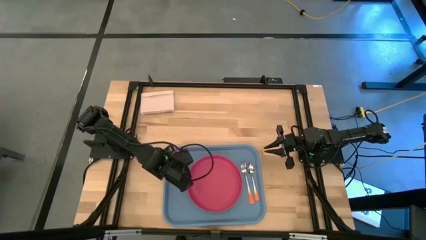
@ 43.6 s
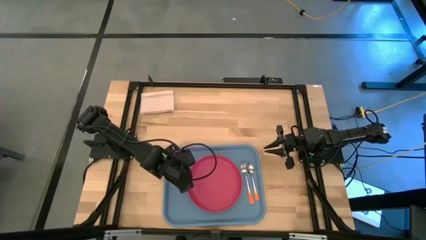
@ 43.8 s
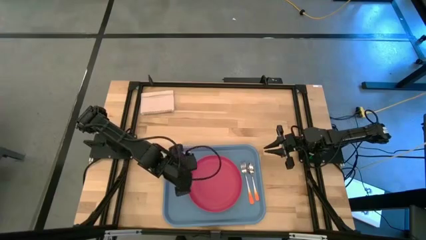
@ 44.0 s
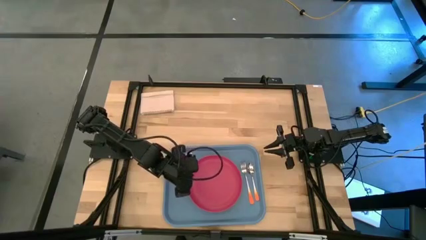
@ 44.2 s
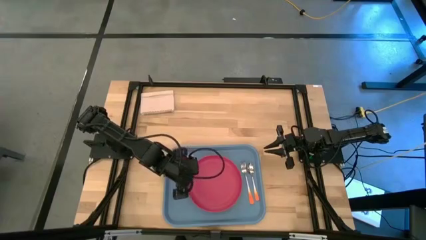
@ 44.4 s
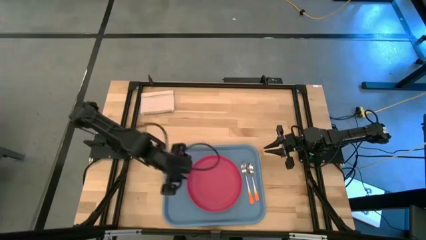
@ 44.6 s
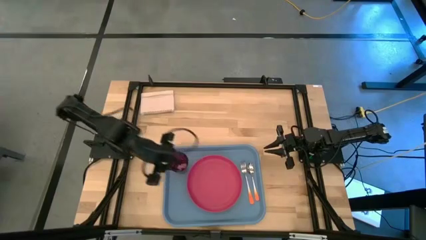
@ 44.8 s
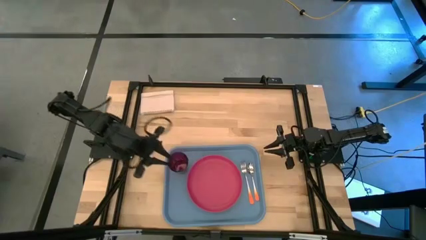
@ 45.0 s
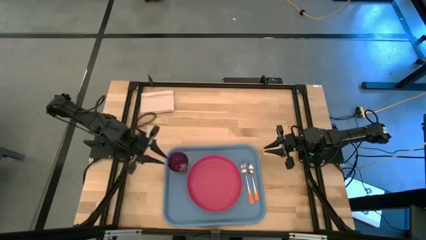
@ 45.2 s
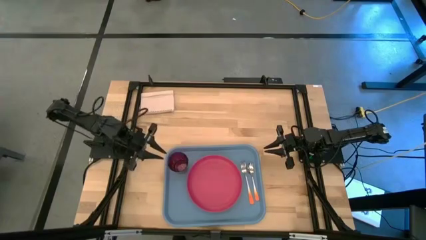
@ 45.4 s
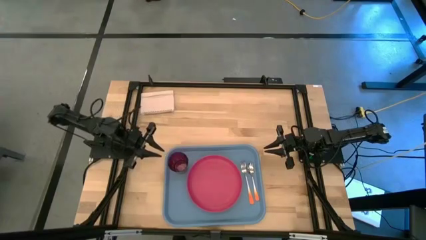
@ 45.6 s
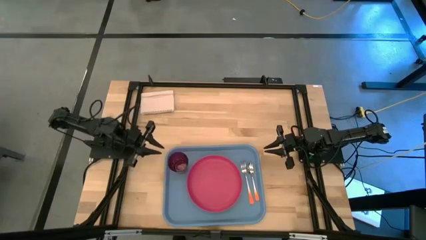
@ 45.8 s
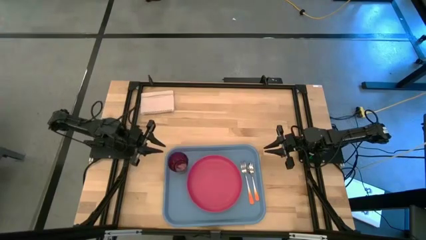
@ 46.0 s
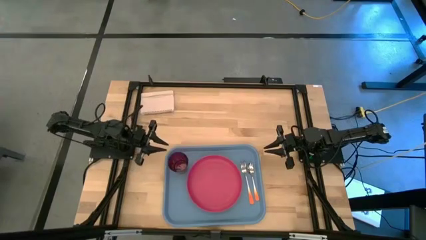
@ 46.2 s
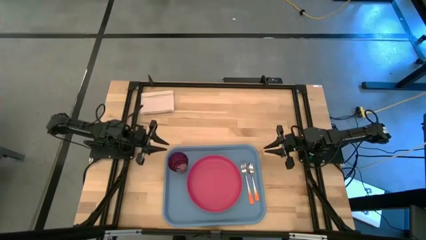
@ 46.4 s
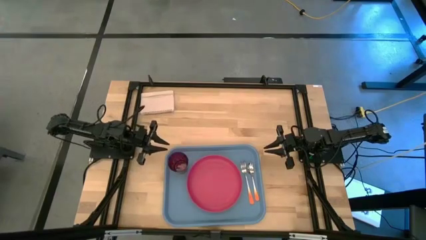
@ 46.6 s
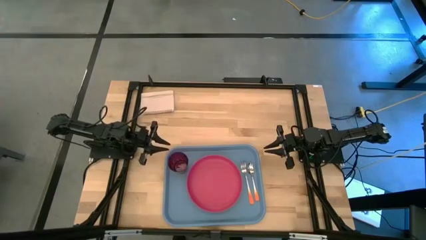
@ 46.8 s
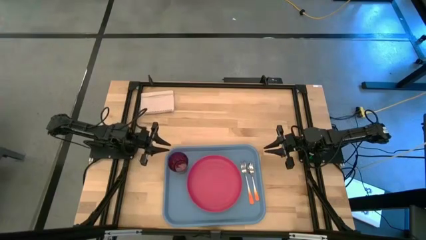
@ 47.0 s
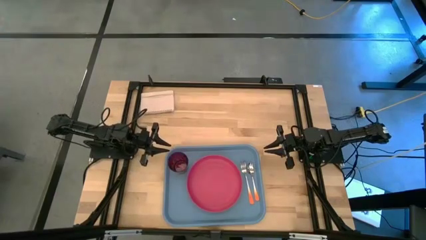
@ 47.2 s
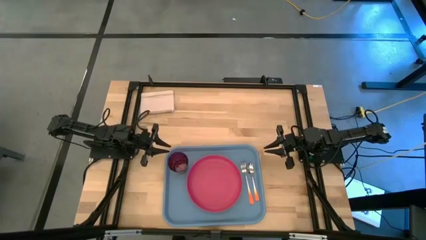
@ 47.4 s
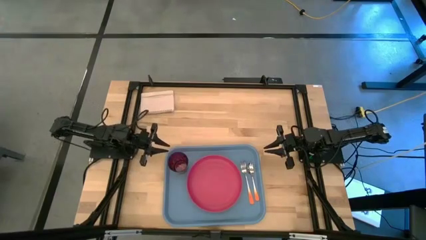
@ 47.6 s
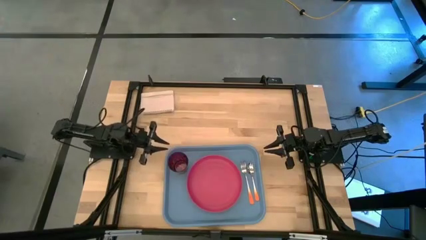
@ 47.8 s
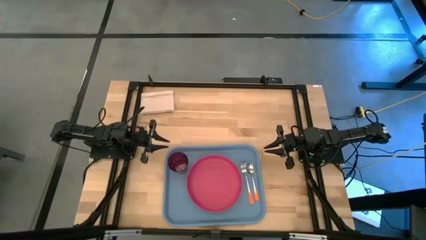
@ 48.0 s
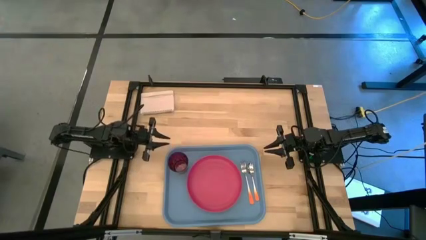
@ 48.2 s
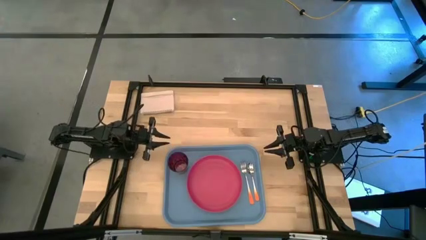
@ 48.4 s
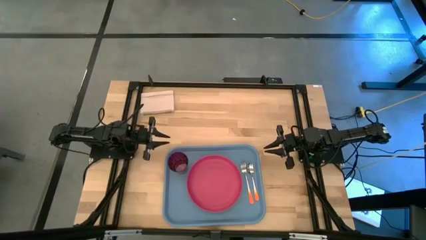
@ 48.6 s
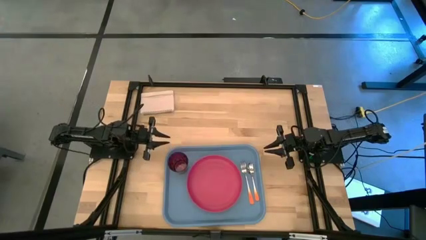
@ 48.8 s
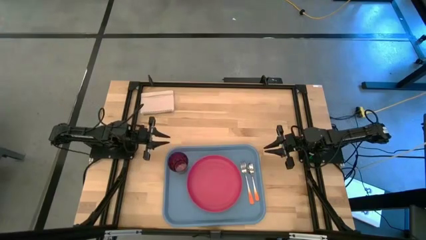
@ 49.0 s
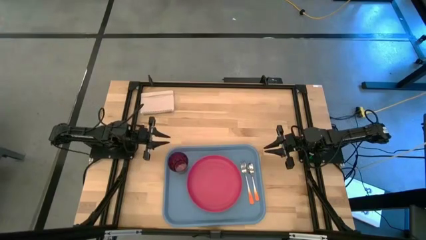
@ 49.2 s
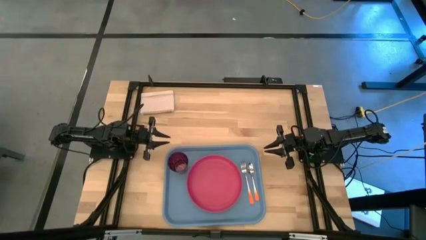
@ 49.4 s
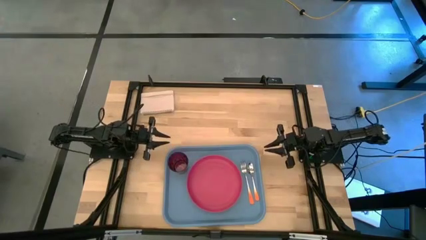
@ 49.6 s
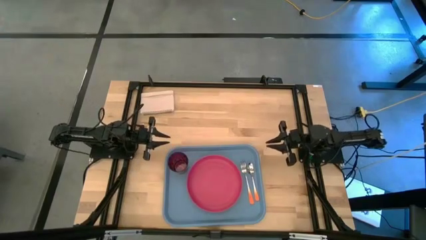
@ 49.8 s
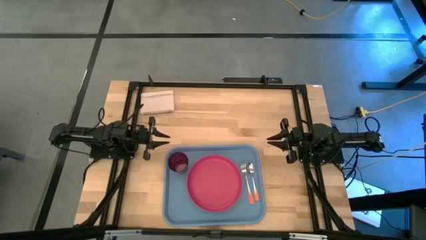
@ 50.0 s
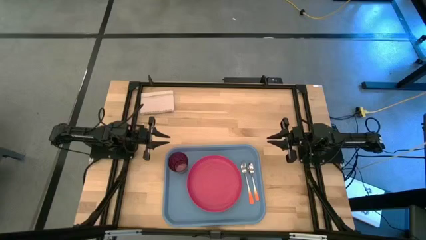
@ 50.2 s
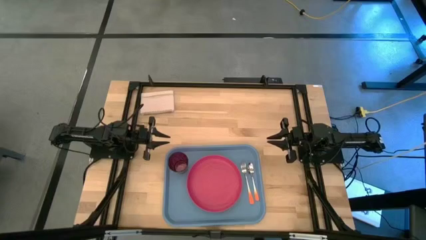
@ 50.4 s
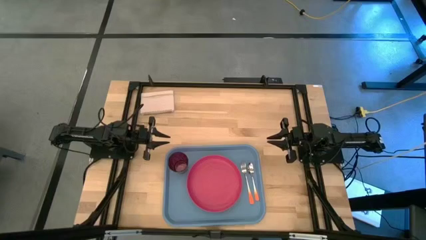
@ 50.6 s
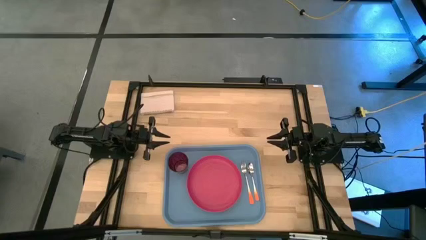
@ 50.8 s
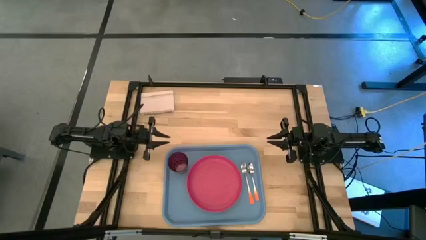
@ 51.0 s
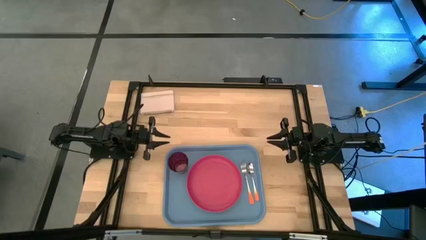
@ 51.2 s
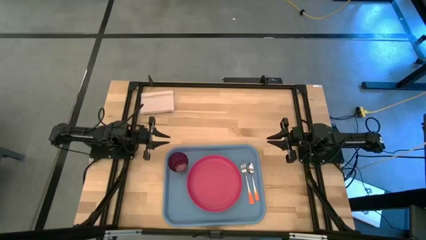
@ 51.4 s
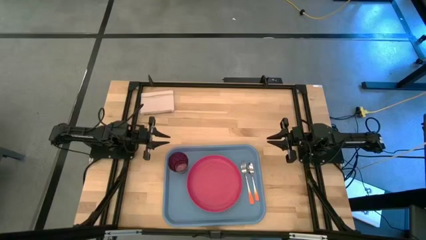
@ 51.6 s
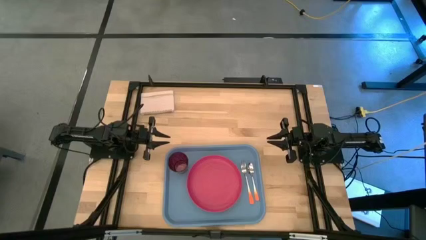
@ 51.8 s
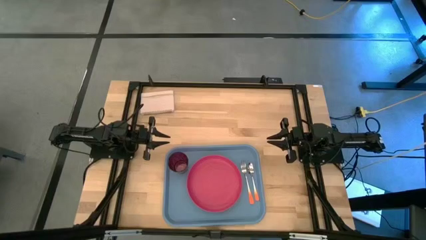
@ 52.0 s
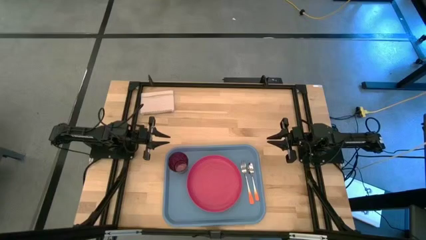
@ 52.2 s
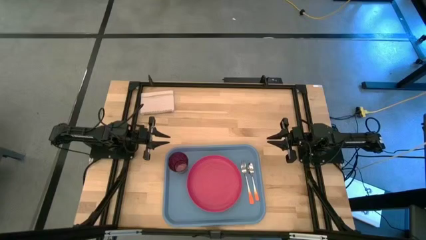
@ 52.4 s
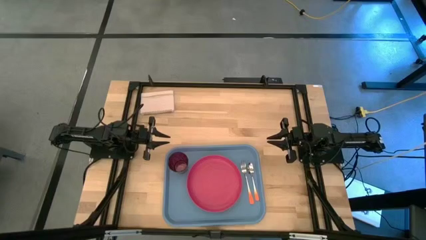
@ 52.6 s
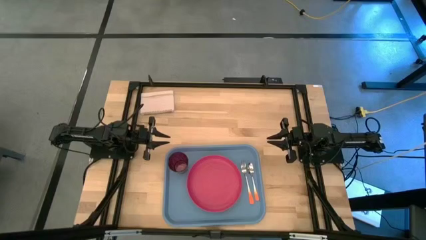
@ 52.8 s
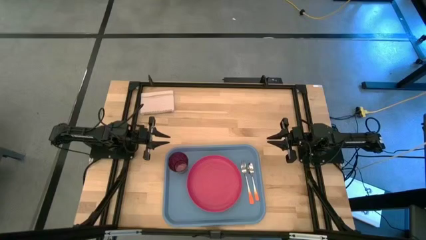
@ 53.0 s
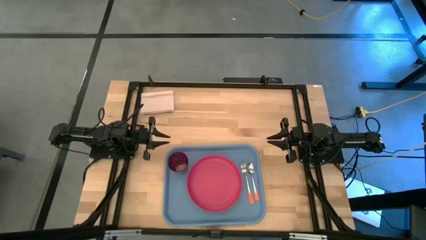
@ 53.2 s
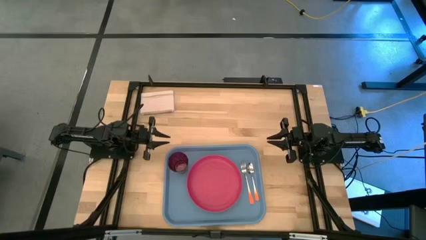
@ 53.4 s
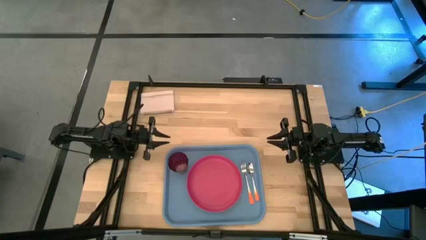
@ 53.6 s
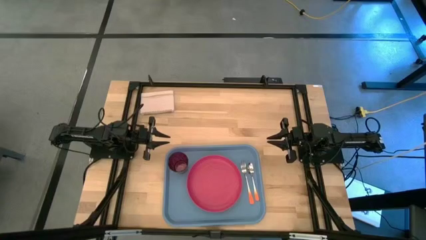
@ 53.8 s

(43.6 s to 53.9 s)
Task: Pick and place plate/cup/fork/spoon on tray
Return to Home Position
